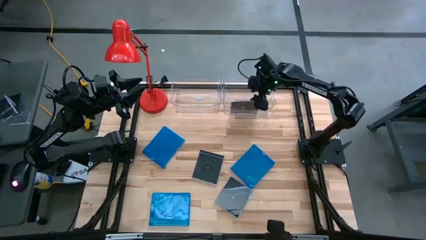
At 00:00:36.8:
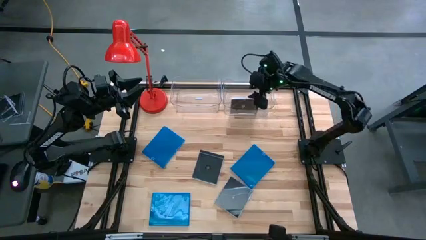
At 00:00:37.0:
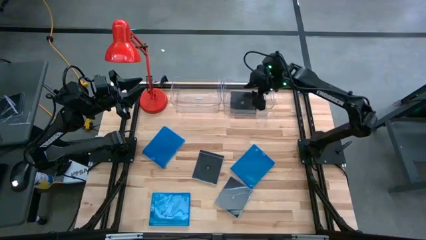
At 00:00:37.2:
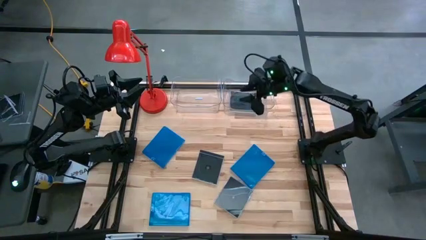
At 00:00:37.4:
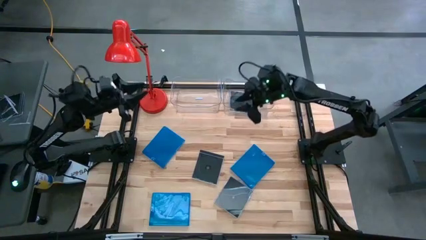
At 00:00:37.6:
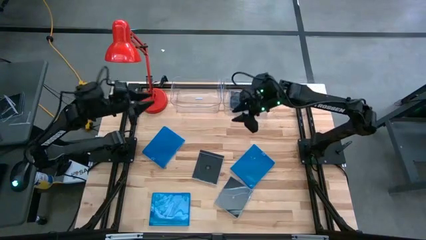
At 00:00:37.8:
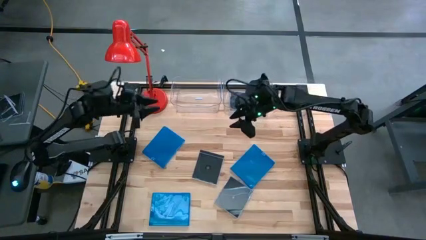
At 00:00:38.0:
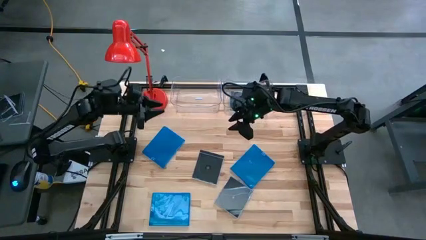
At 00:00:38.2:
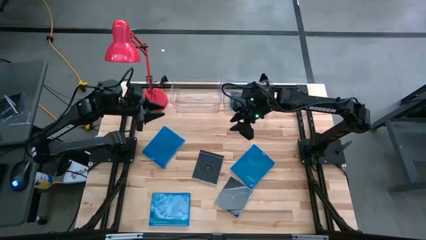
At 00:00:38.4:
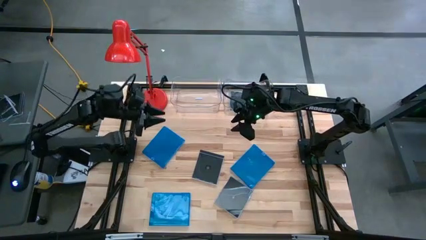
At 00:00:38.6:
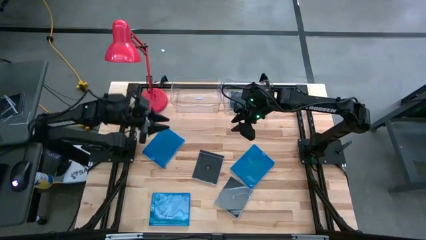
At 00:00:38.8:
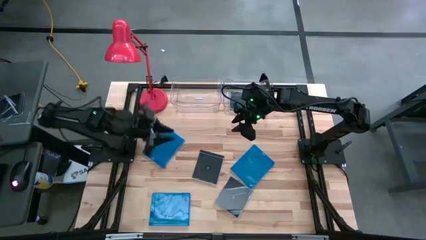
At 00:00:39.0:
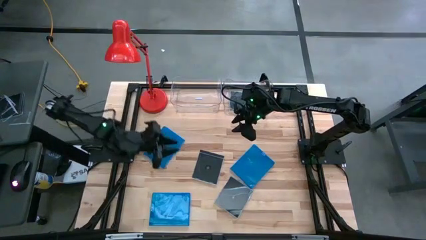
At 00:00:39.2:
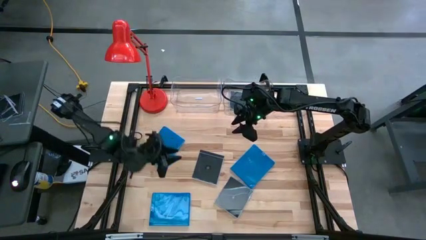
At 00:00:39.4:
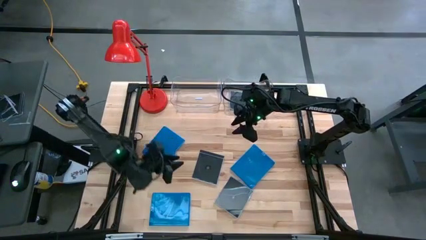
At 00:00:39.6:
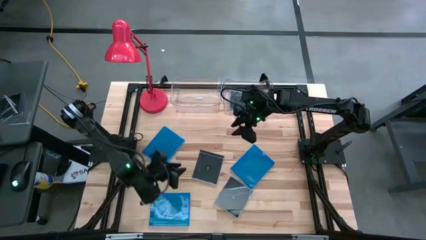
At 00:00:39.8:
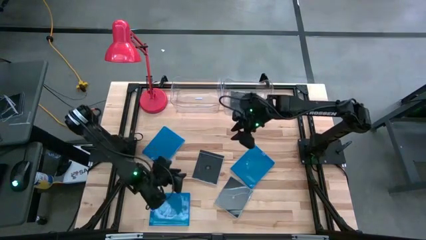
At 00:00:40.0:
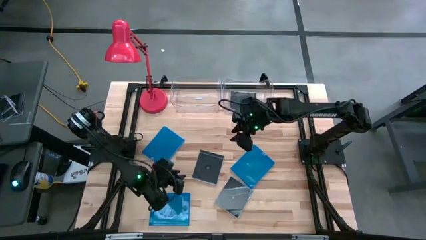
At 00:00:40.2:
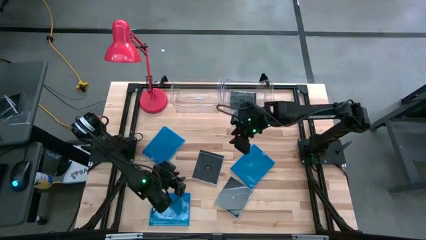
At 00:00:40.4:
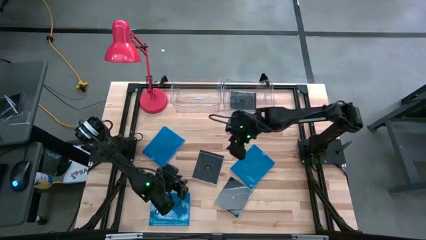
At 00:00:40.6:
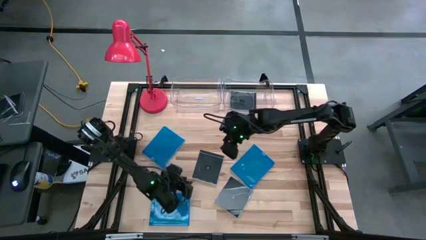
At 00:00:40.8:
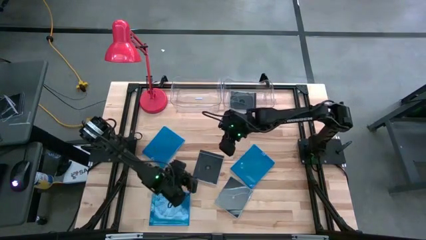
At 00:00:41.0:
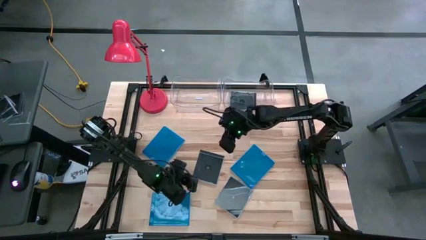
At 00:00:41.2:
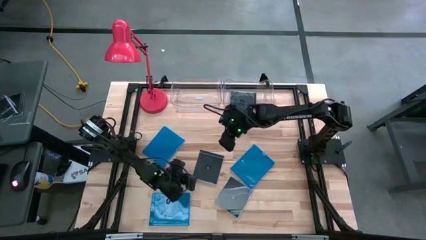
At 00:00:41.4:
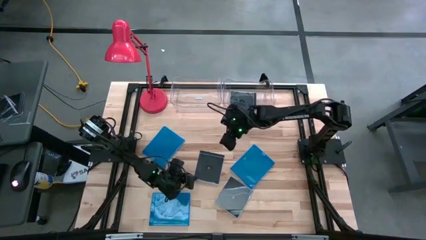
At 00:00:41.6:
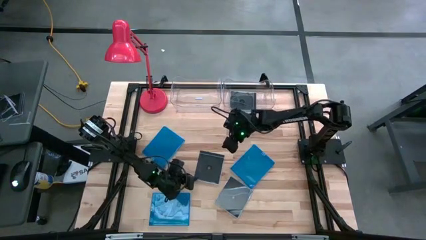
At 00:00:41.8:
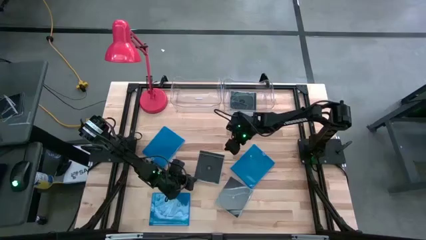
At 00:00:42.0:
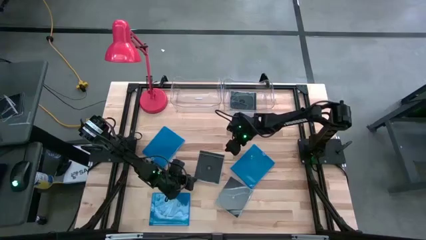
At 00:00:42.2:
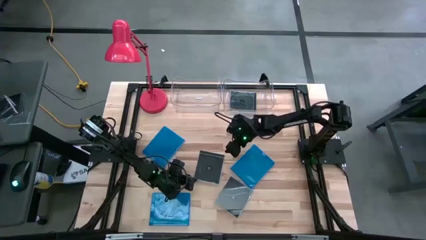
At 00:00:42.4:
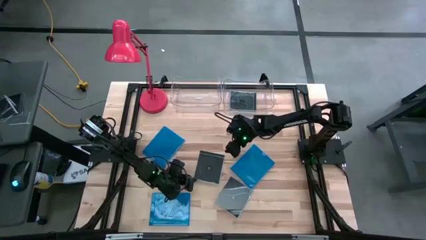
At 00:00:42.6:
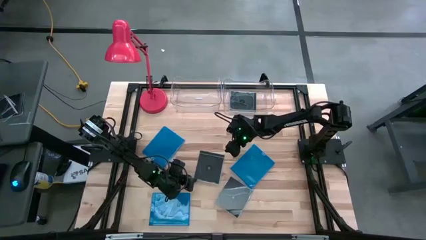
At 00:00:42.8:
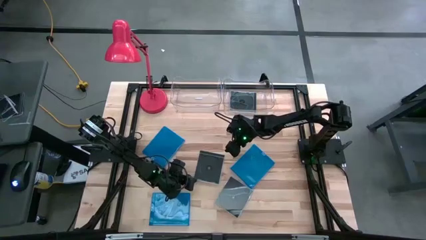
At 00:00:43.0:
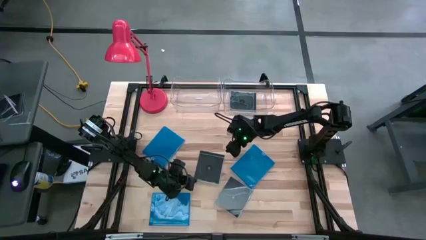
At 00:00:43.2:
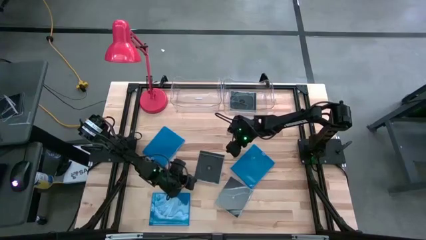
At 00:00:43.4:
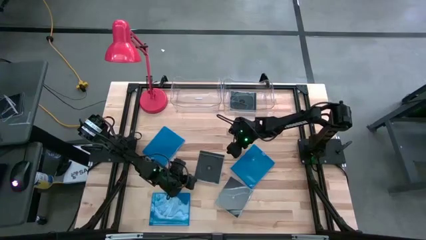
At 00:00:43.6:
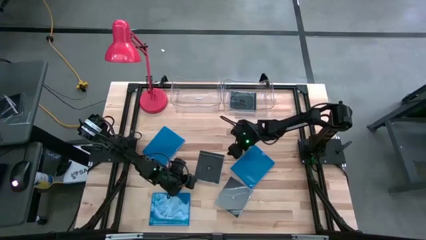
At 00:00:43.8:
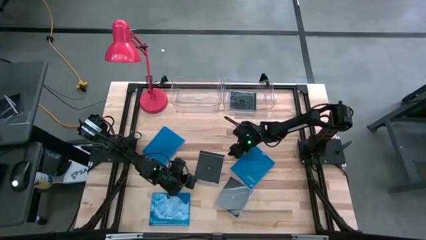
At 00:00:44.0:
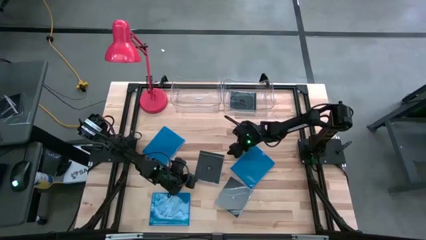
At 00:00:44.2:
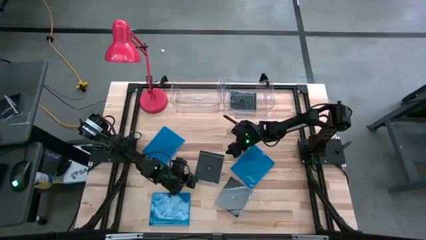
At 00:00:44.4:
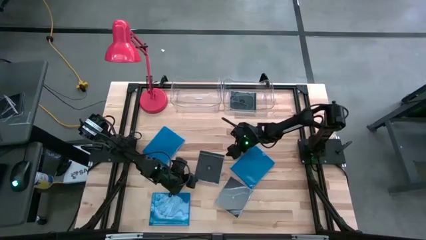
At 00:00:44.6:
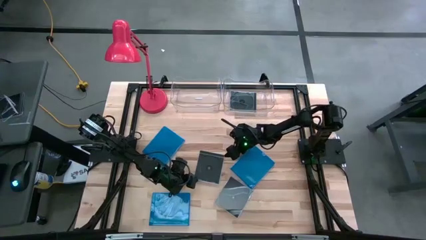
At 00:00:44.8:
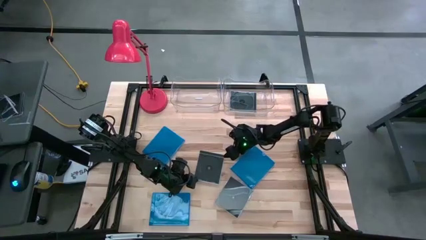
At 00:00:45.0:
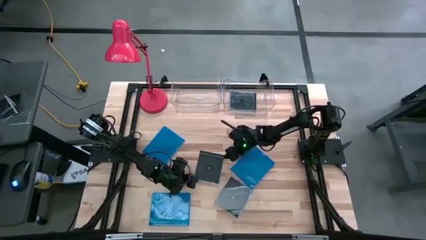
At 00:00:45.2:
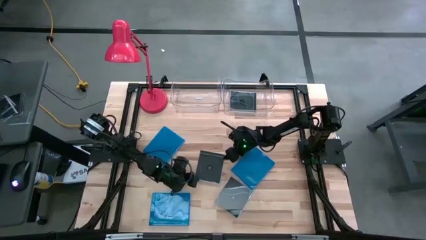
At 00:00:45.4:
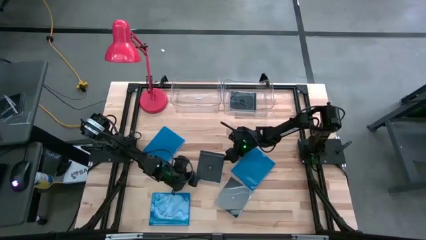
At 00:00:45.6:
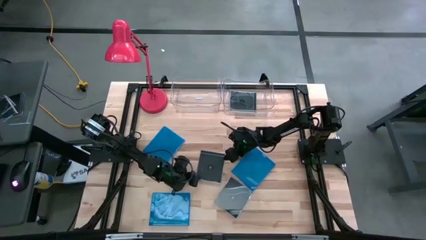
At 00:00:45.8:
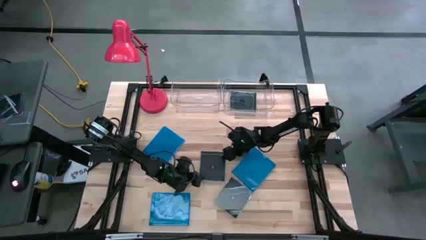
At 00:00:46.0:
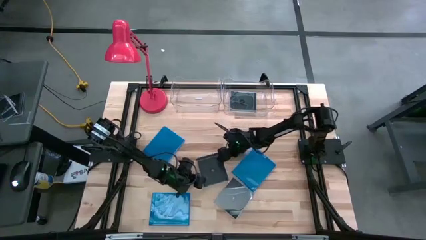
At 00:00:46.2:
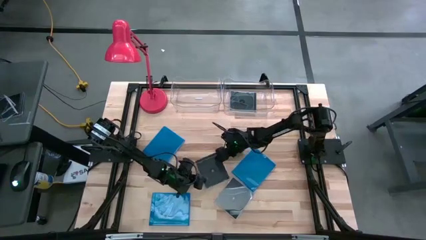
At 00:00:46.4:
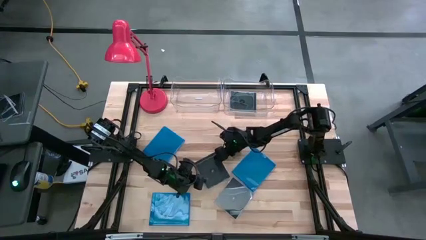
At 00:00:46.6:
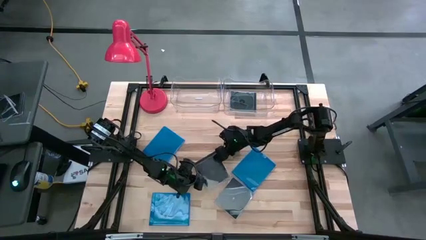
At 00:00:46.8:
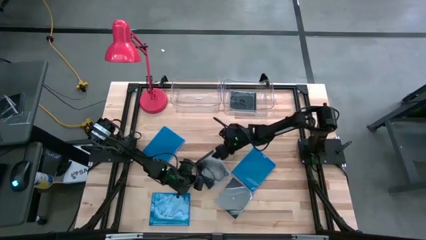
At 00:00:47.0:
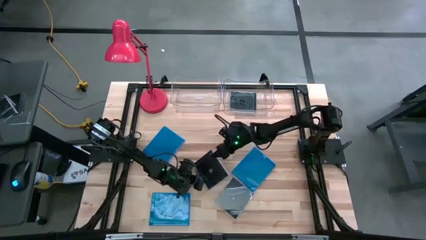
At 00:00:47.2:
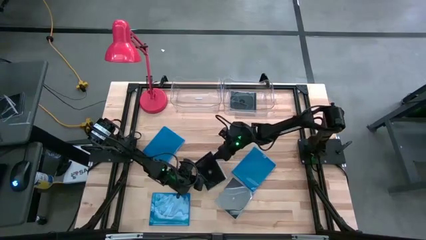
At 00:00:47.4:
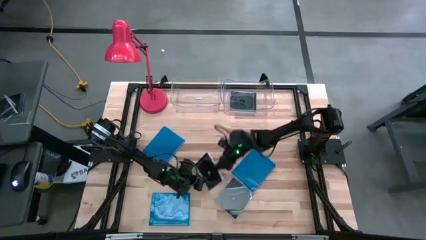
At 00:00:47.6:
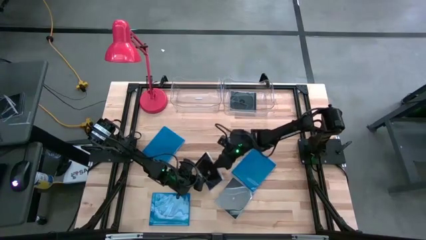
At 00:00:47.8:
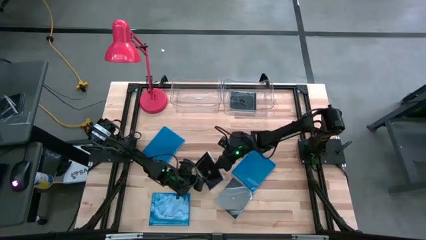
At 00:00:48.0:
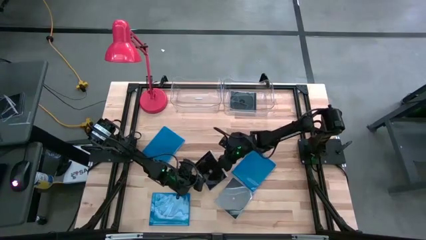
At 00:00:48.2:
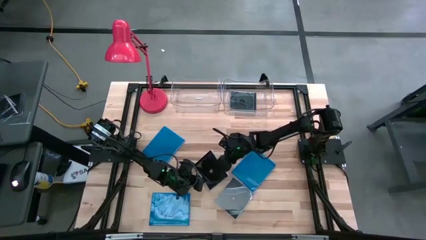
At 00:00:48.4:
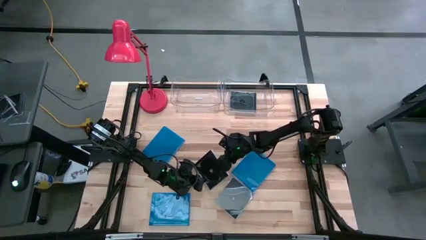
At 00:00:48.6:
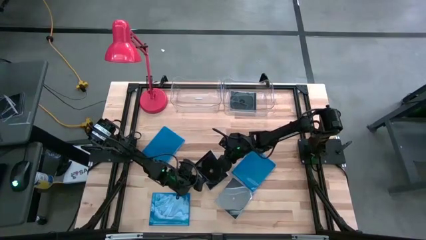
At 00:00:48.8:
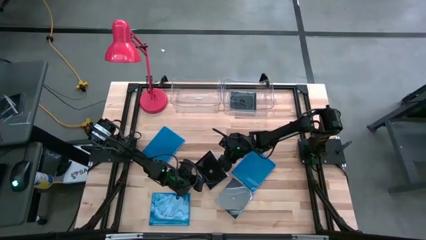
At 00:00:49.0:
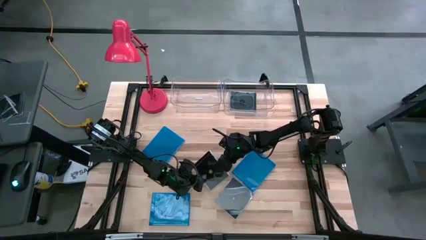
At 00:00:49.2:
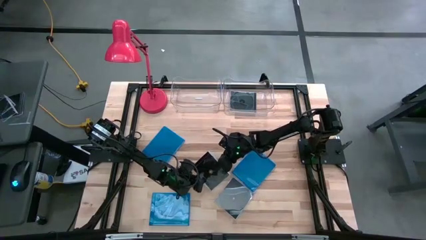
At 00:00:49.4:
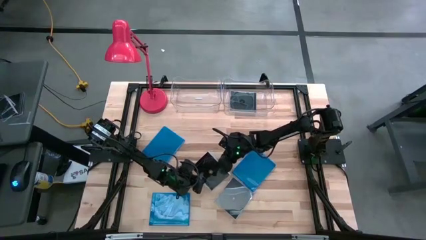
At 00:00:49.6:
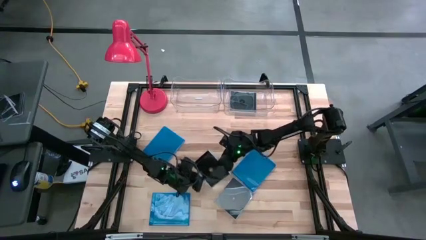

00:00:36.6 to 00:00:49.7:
Task: Pick & place jewel cases by type
Put the top black cd case into the right transparent bin

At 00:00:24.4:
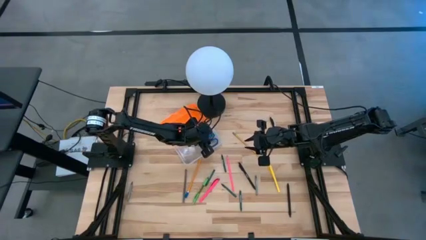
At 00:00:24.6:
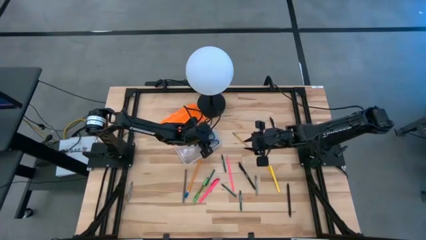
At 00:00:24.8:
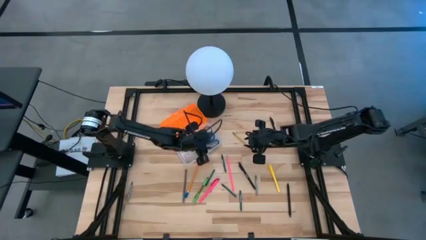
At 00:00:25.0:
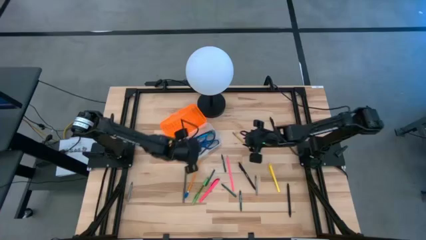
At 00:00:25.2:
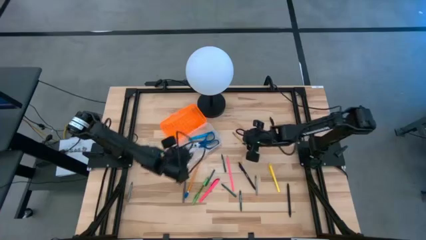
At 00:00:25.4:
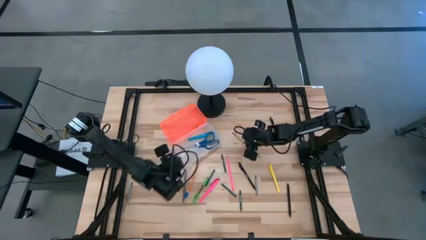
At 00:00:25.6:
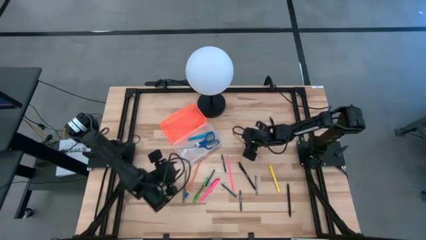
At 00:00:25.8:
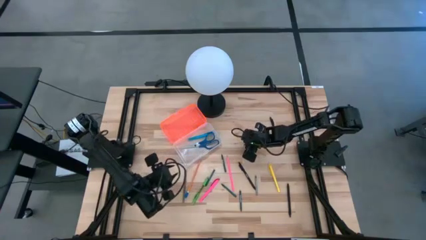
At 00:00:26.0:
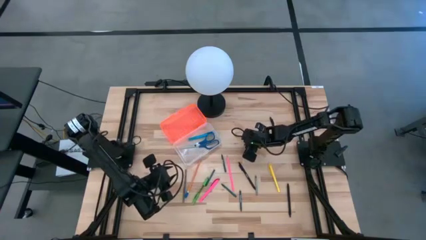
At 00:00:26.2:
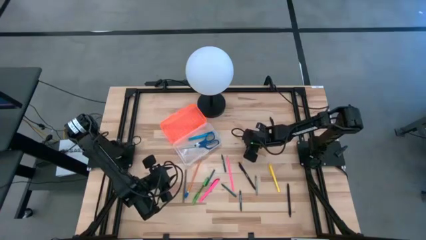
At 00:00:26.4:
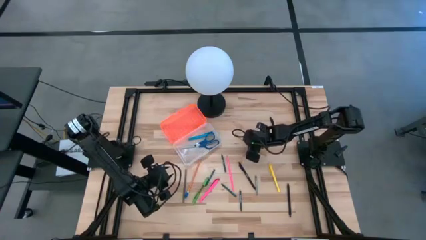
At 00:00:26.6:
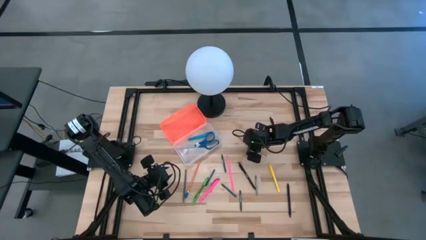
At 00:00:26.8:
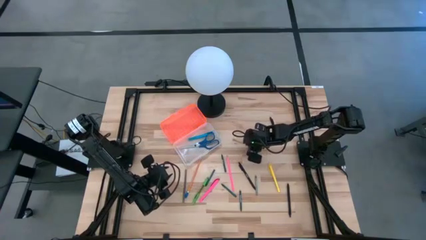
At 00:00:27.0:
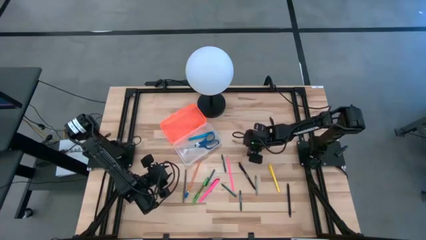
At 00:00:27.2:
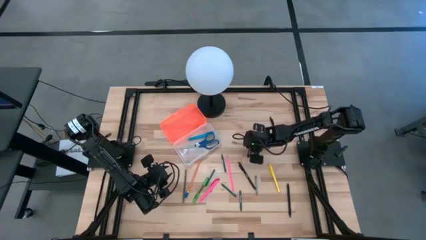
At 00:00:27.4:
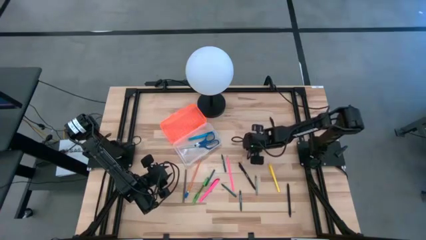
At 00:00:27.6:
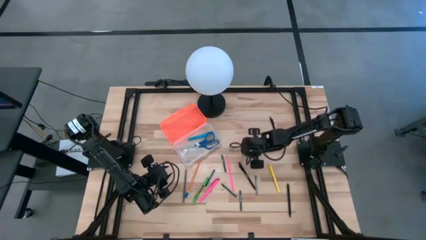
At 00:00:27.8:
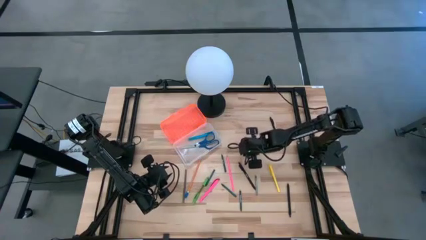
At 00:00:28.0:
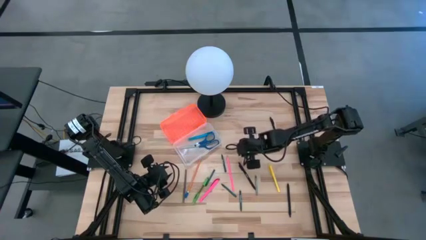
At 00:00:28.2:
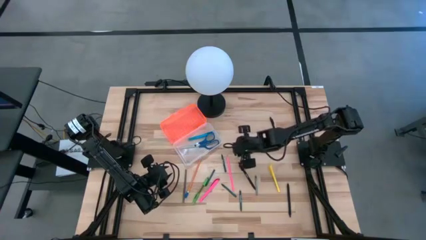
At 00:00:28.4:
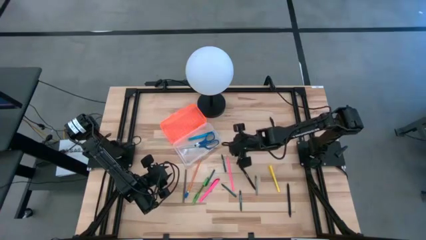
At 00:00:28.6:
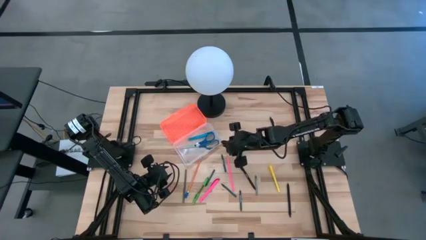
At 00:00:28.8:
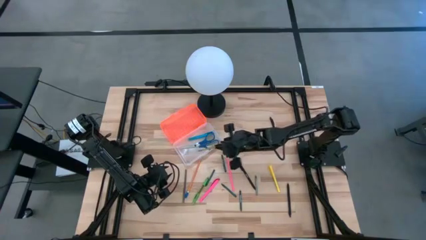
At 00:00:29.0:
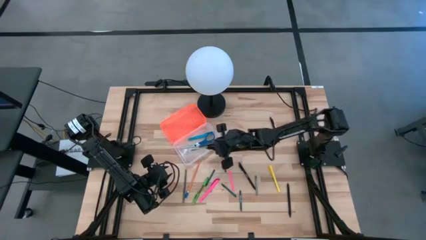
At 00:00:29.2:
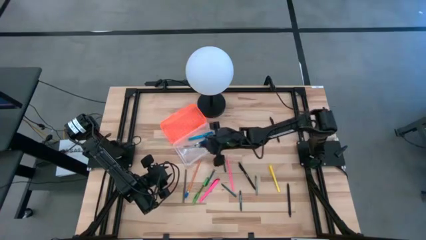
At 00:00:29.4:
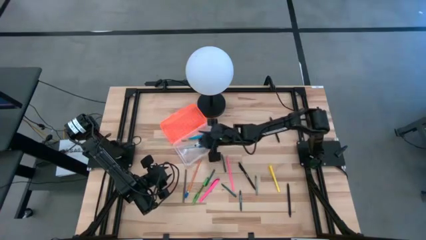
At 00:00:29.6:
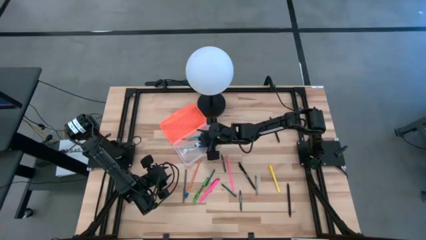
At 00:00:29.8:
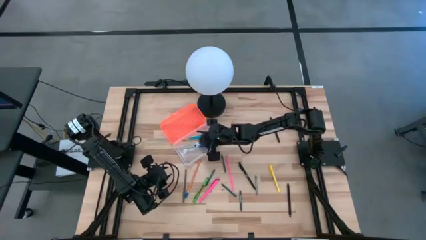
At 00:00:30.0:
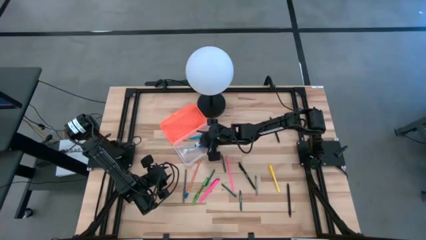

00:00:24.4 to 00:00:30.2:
Task: Pick & place school supplies into a supply box
Put the yellow pencil into the orange supply box
